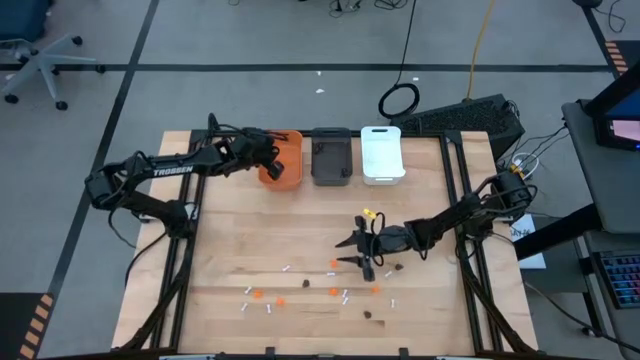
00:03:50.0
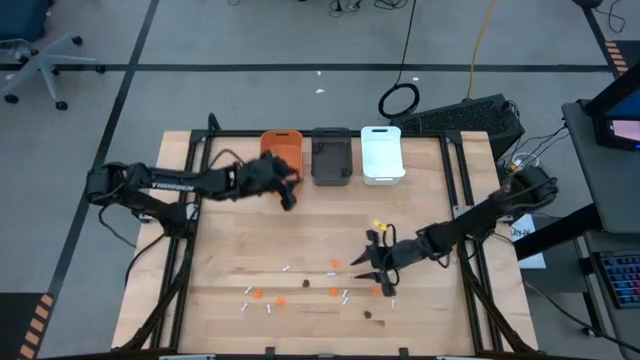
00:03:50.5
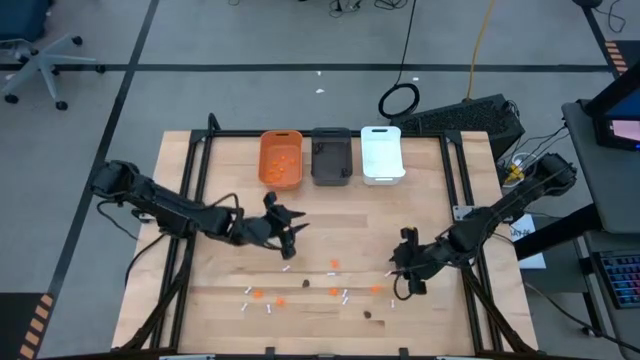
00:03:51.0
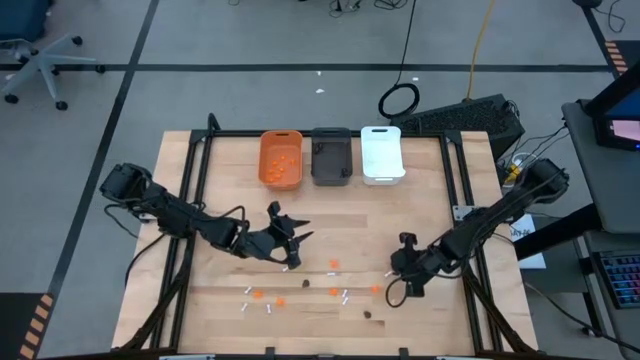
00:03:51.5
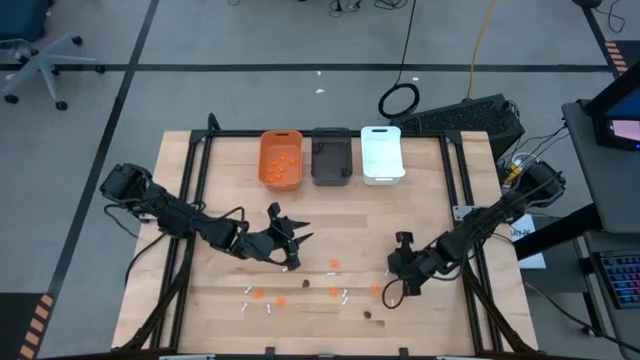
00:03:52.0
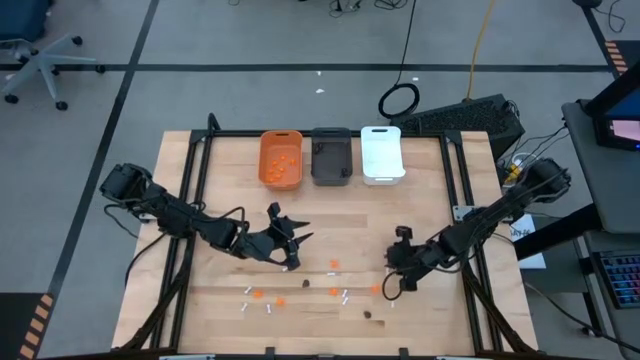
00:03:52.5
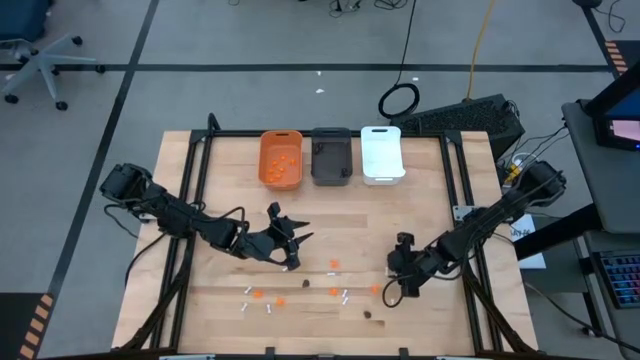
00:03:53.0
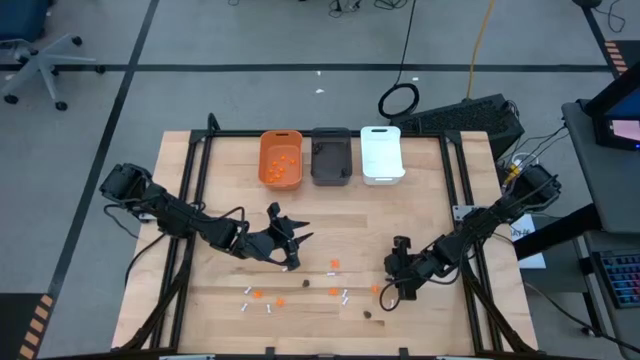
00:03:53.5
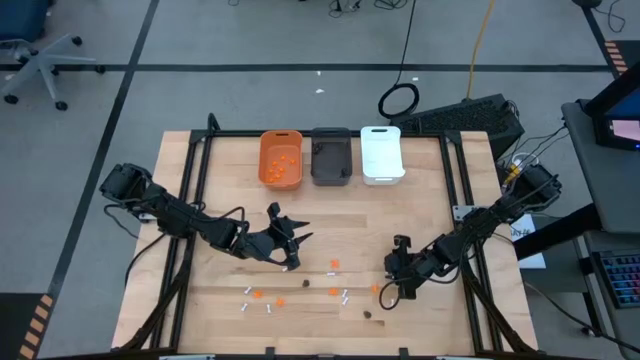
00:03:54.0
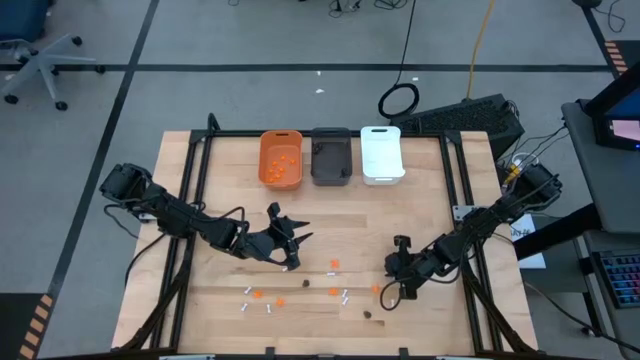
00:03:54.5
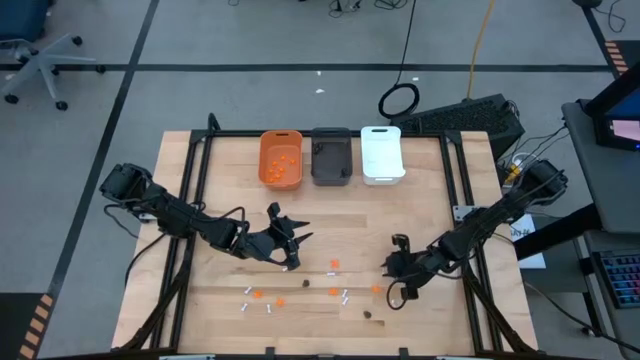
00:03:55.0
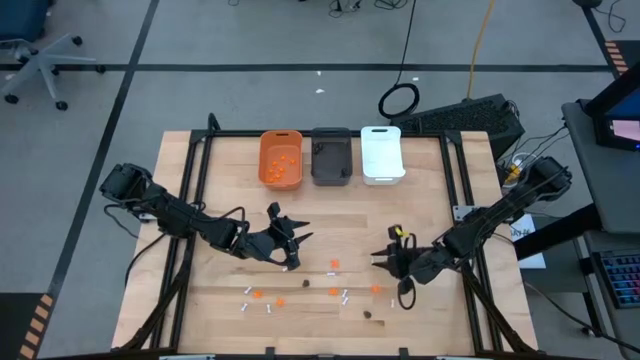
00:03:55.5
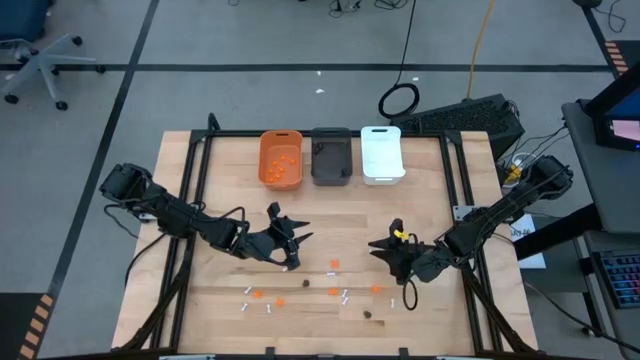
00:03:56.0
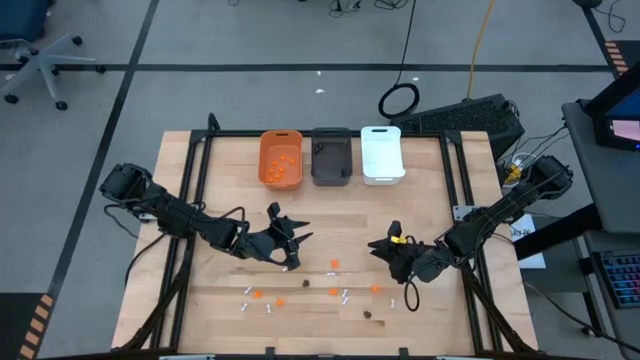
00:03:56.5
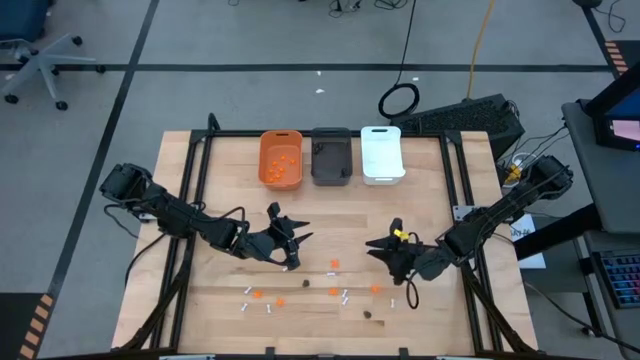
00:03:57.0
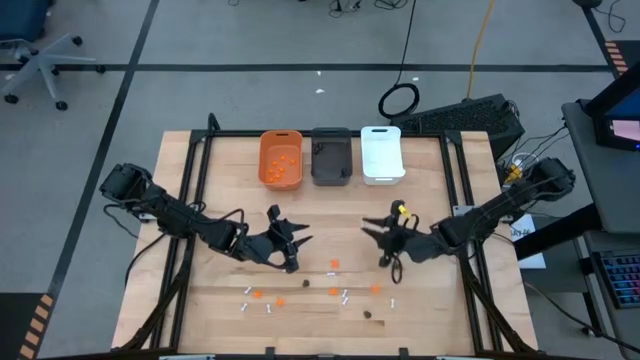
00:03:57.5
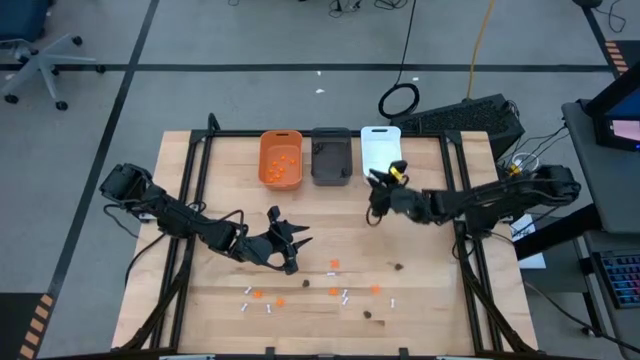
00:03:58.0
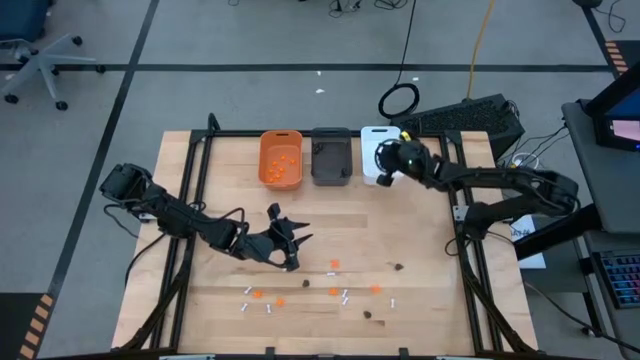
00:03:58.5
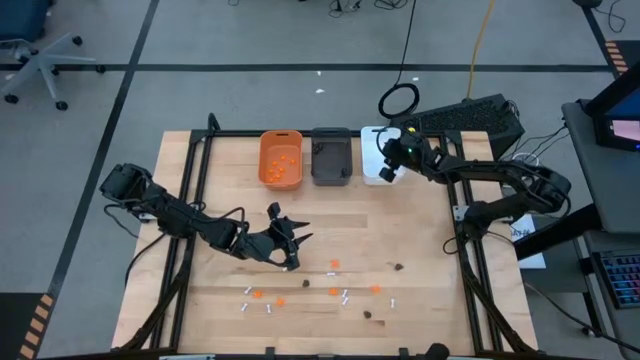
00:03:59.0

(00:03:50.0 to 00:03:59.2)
Task: Sort Halloween decoration
Put the white bone toy into the white bin

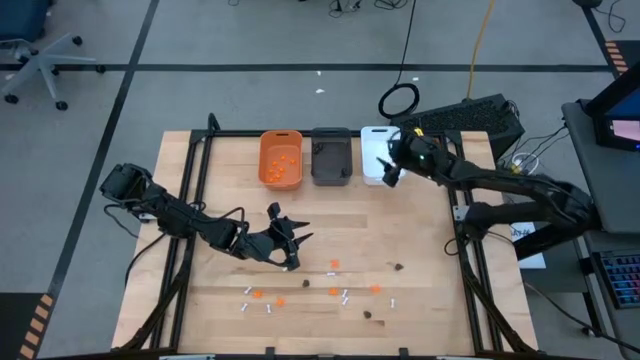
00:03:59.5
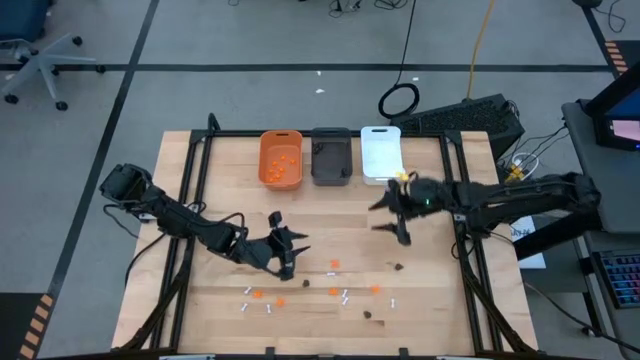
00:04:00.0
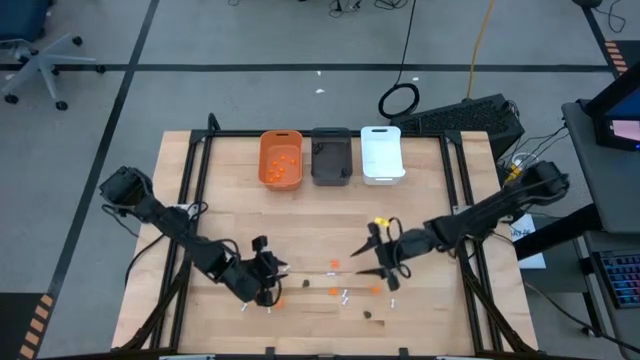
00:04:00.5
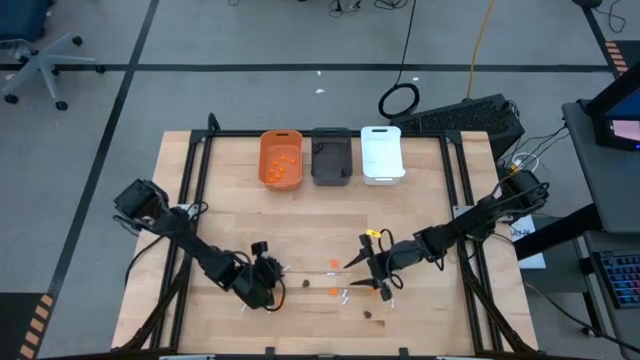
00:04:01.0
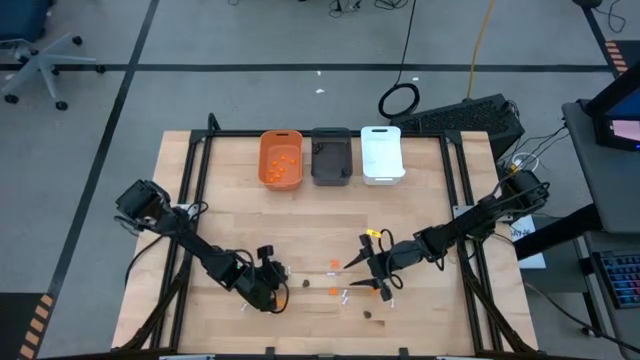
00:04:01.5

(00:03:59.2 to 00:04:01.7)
Put the white bone toy into the white bin

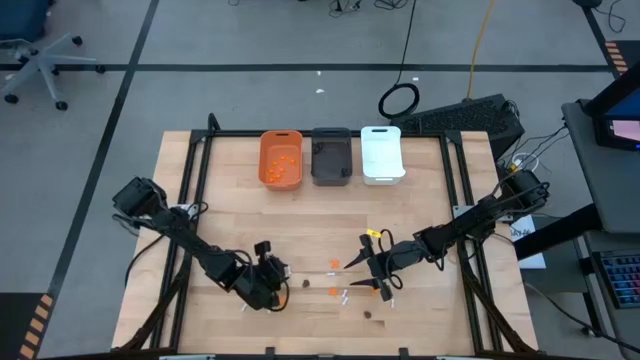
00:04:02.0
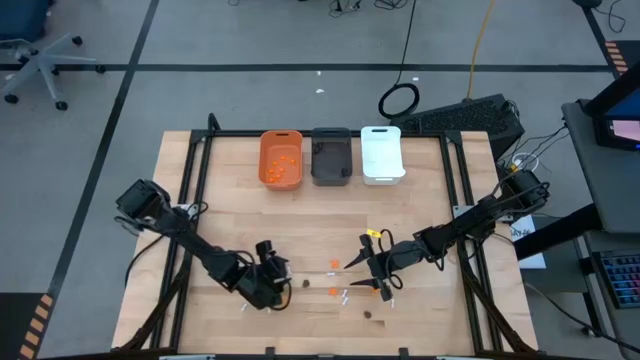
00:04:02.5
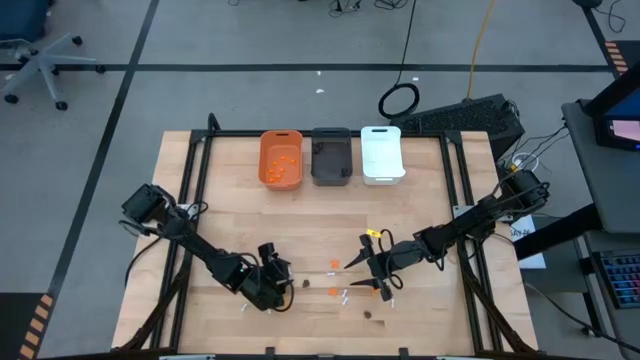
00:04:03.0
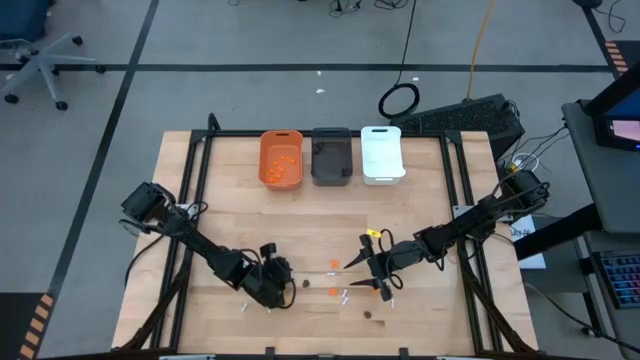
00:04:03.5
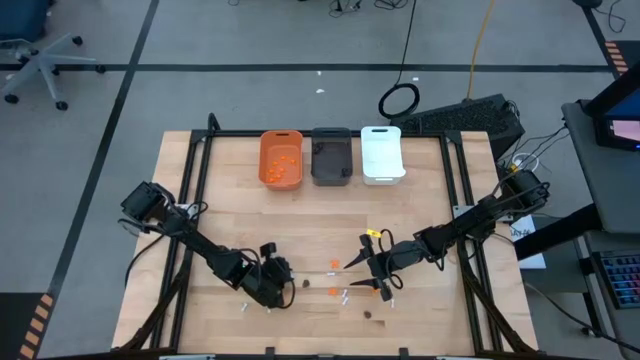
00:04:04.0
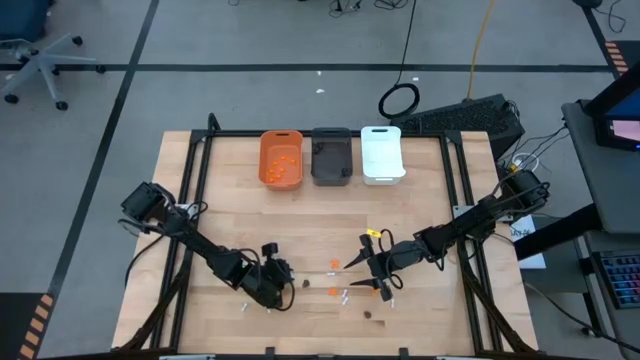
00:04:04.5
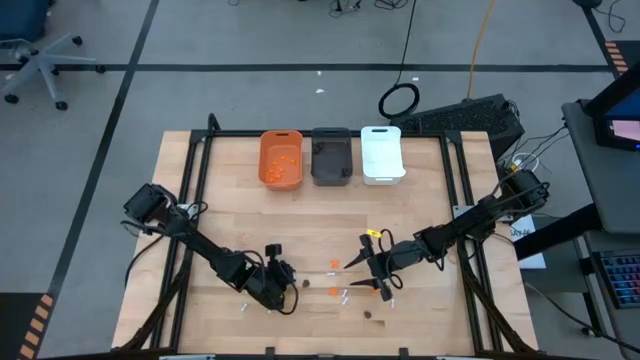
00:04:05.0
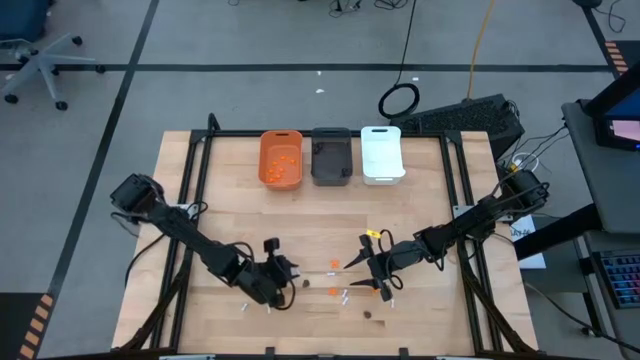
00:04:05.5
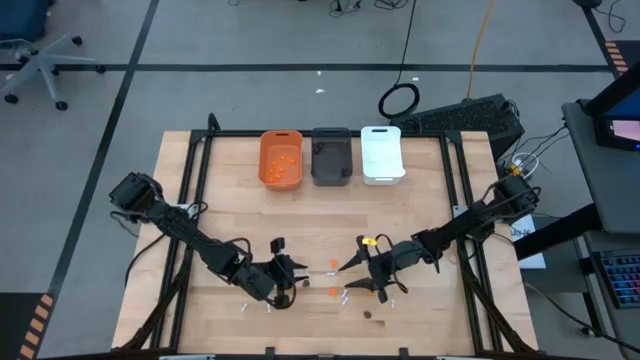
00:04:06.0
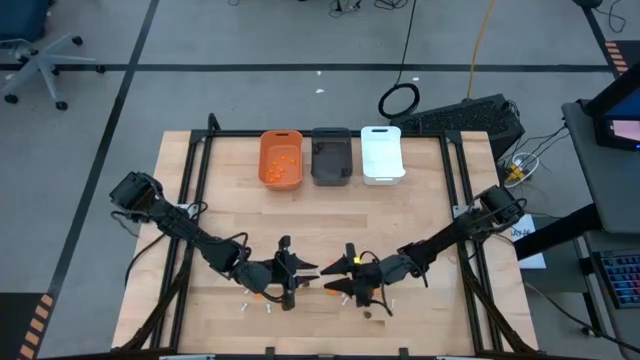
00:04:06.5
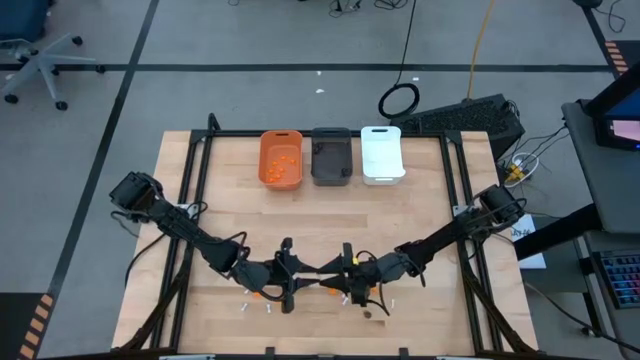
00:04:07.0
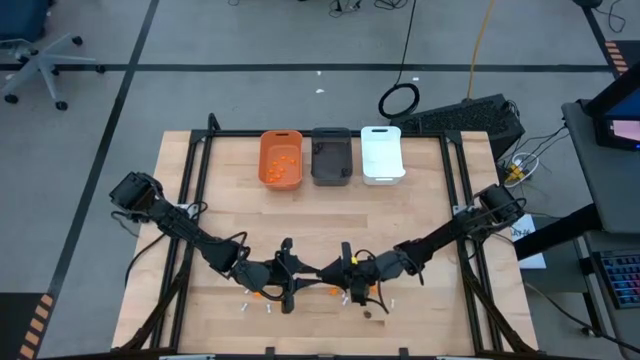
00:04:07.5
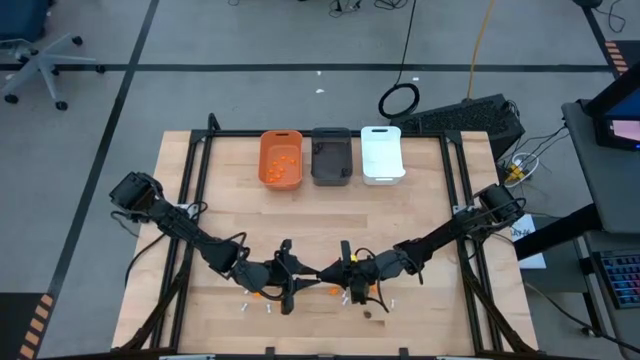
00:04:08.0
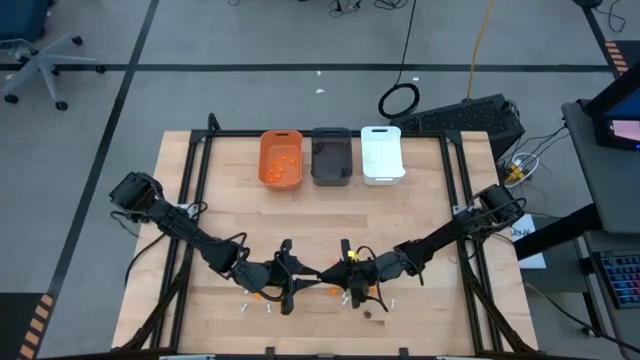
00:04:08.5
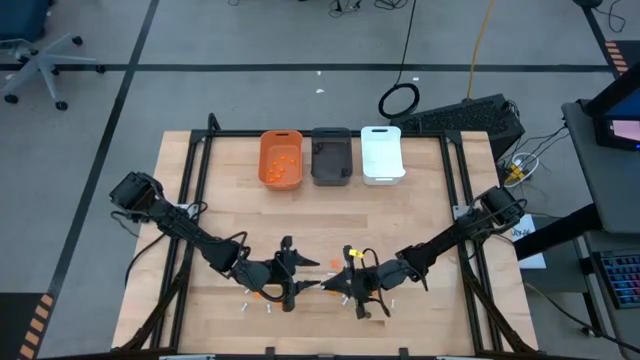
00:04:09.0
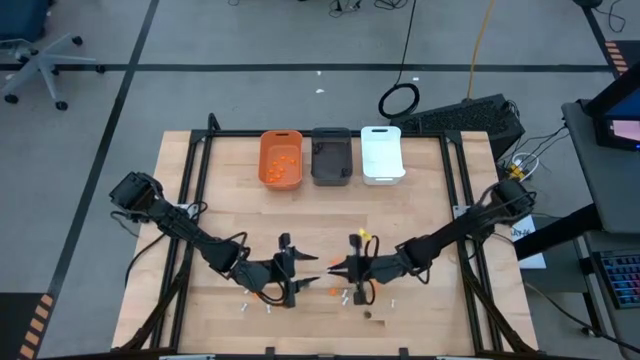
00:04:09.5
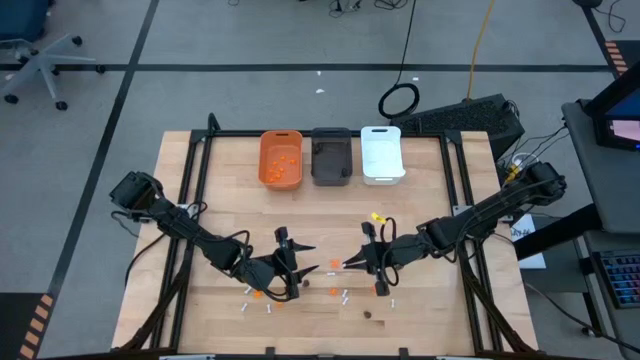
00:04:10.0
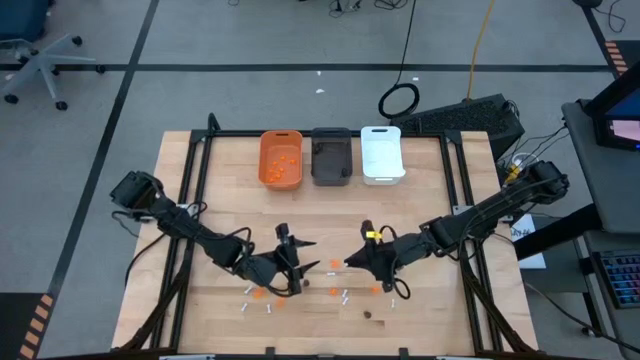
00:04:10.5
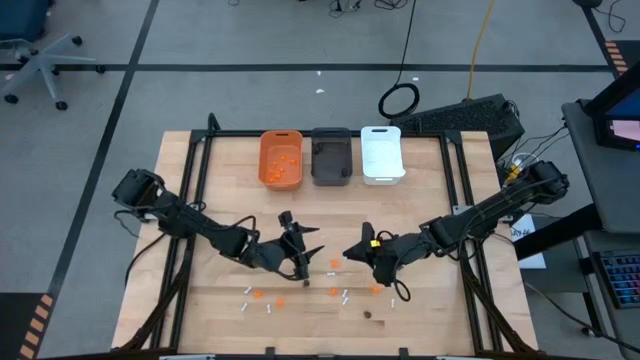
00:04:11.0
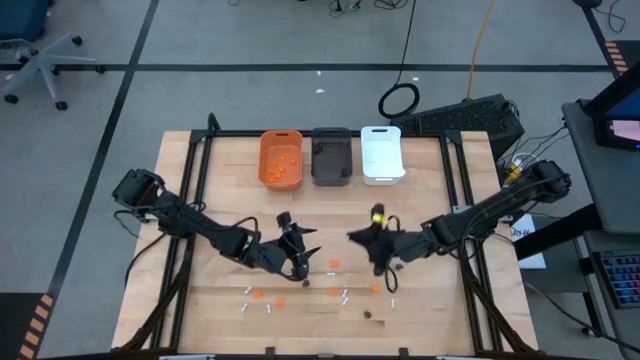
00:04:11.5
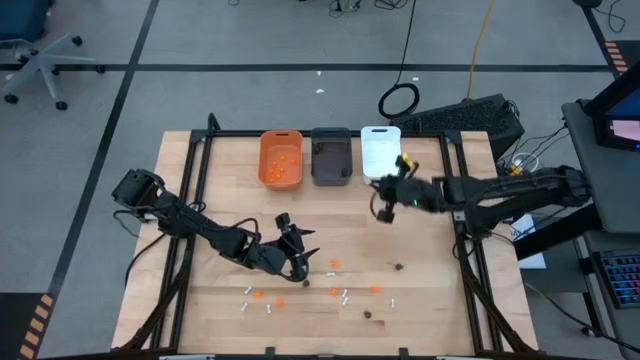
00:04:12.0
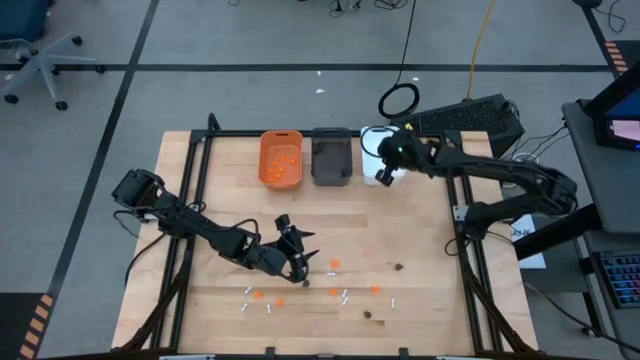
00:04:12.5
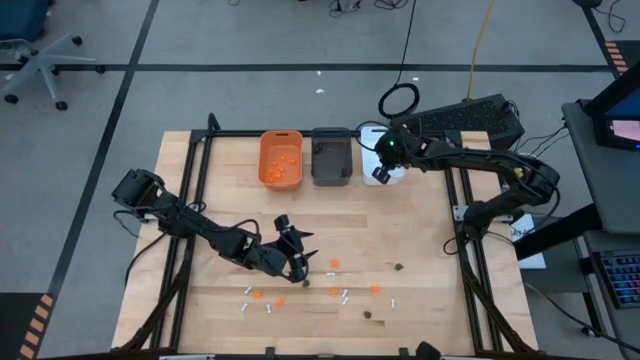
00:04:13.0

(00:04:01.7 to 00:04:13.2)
Put the white bone toy into the white bin
